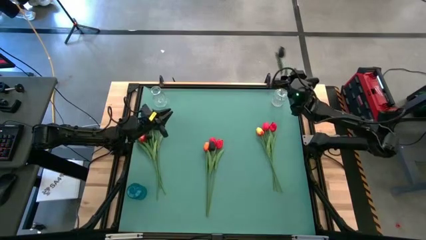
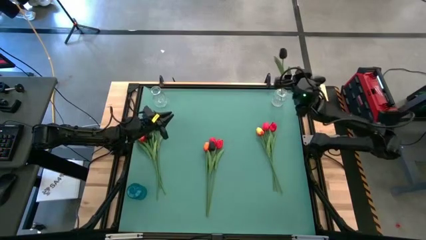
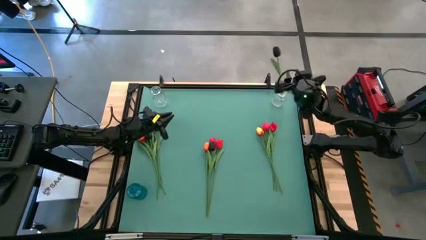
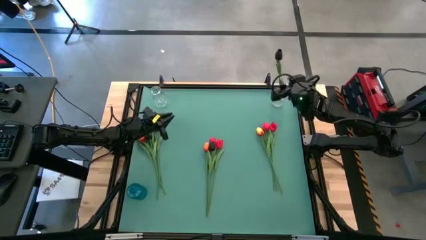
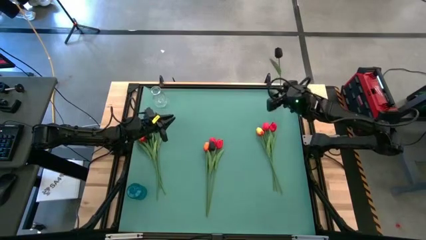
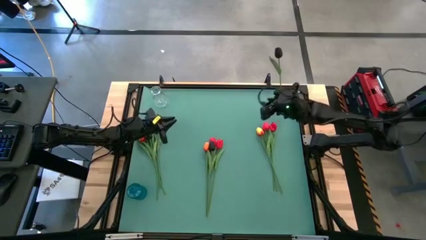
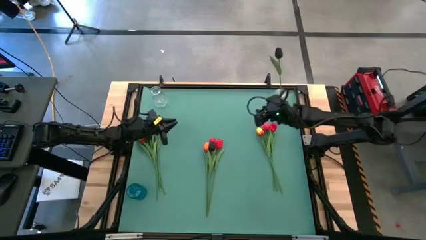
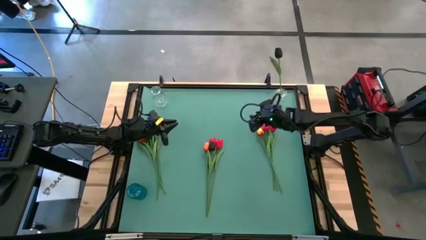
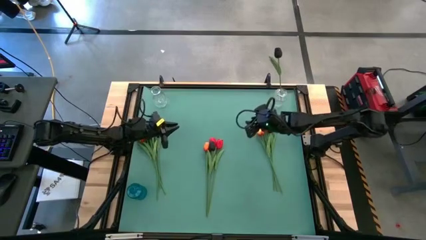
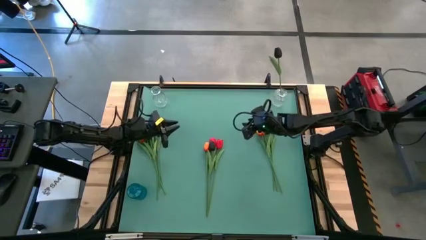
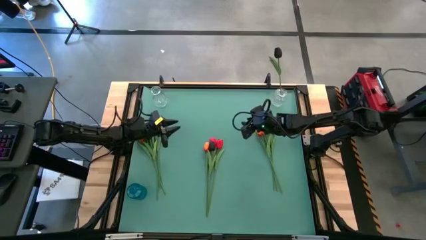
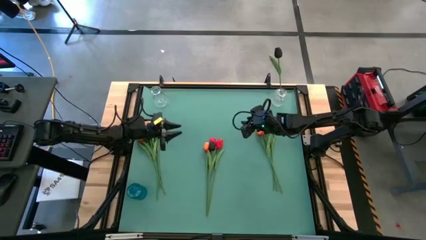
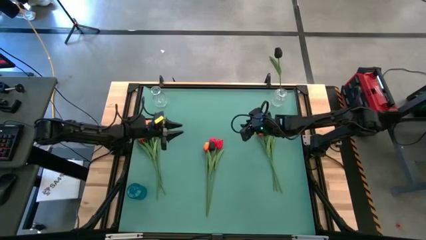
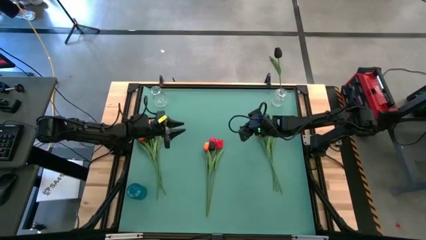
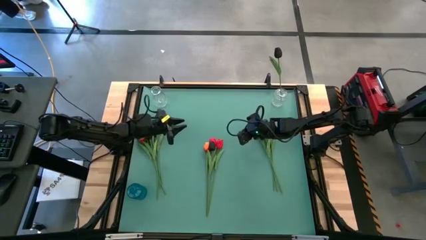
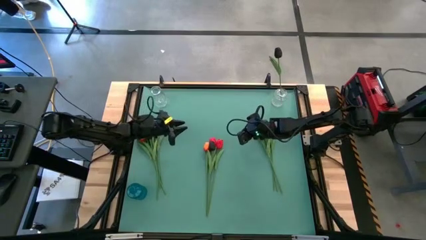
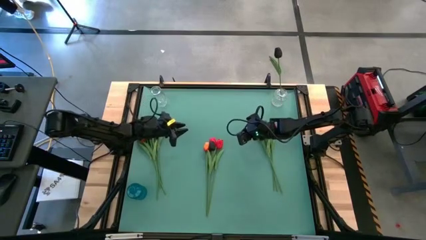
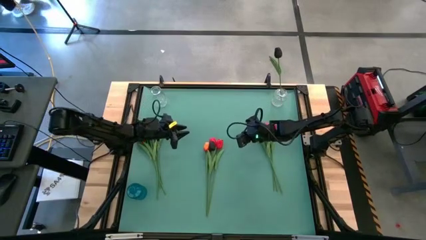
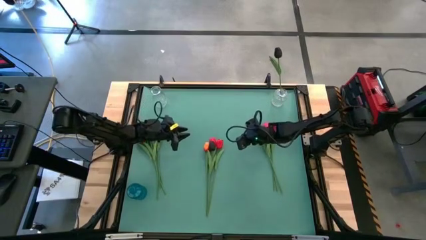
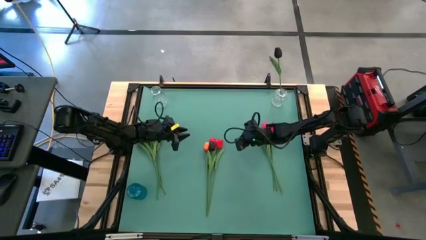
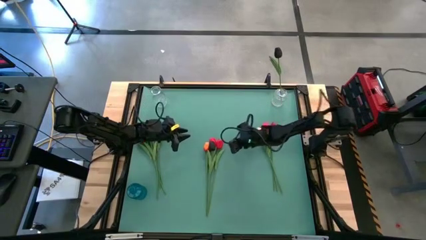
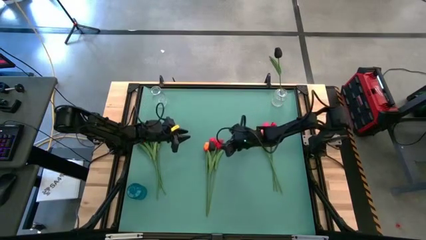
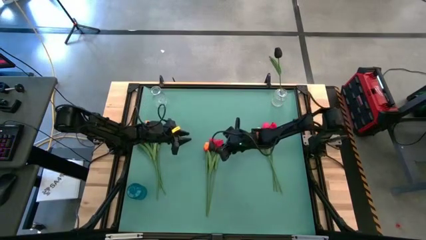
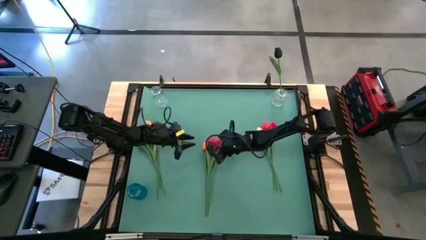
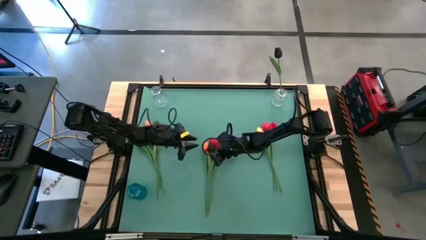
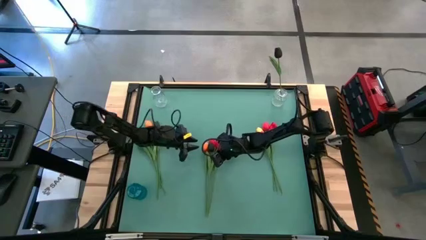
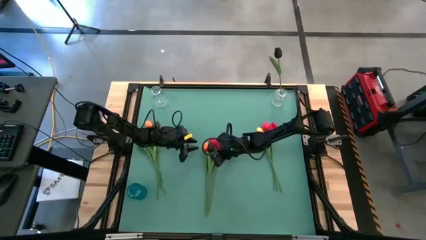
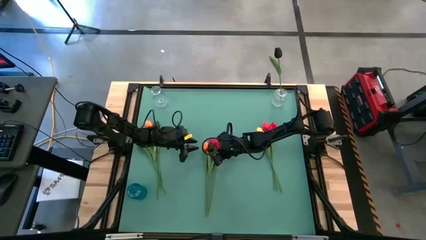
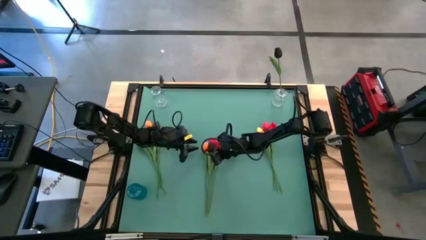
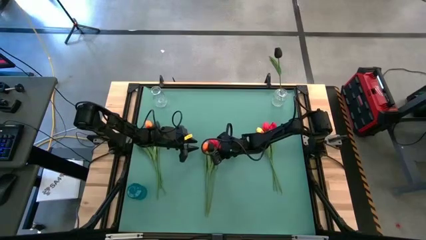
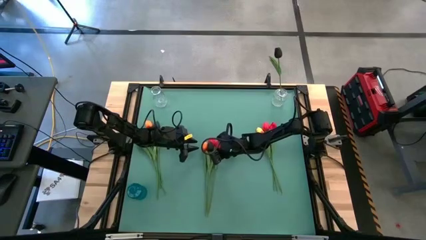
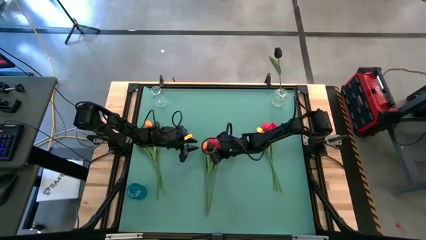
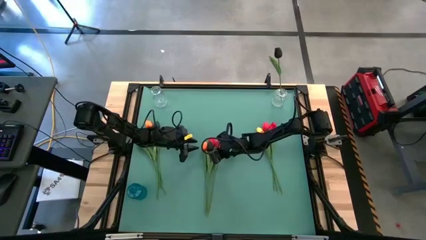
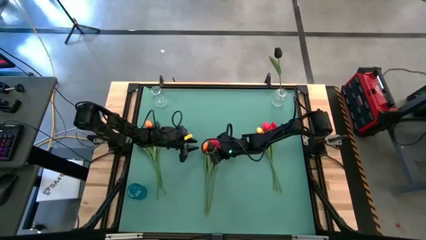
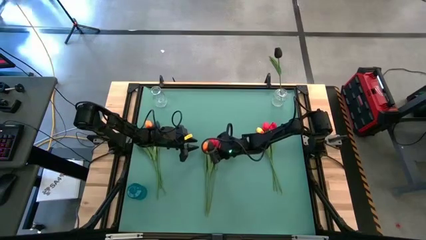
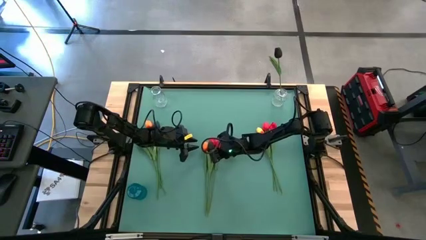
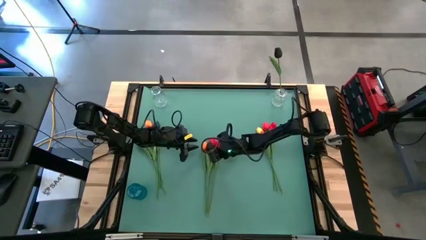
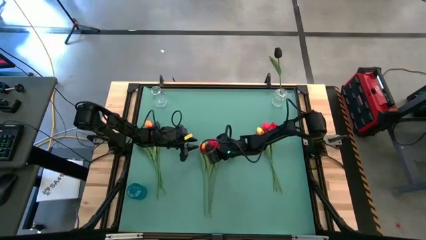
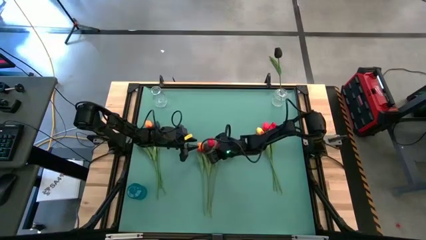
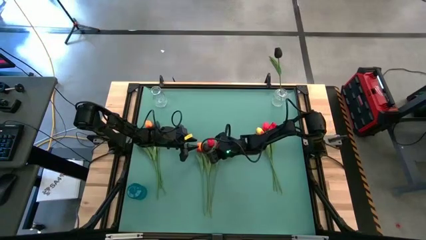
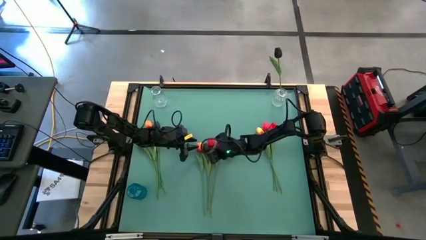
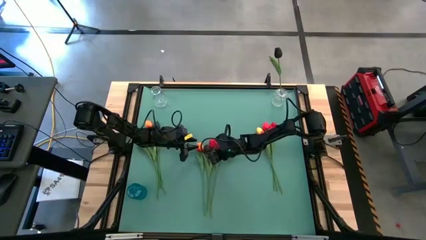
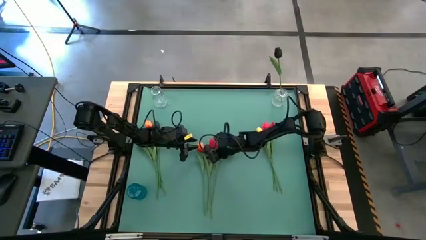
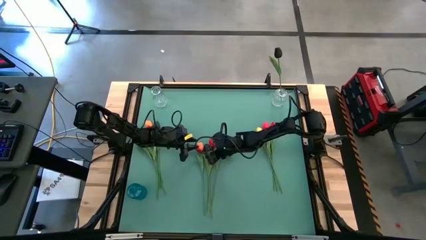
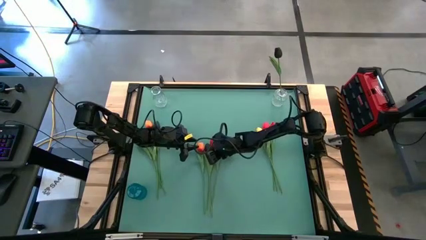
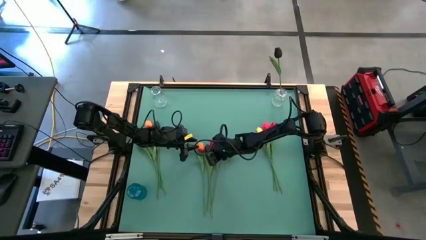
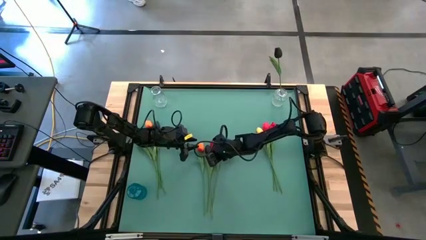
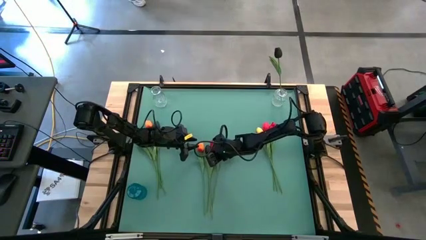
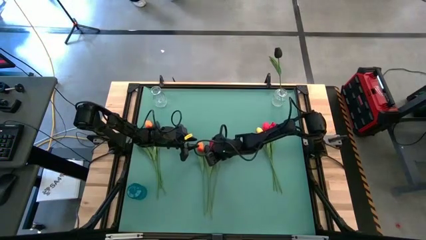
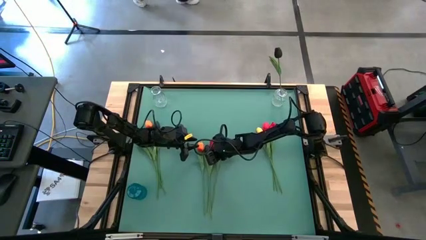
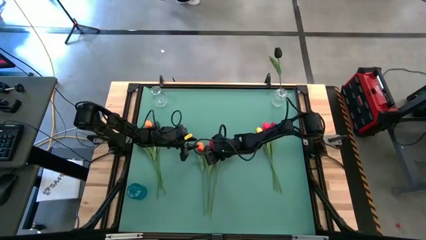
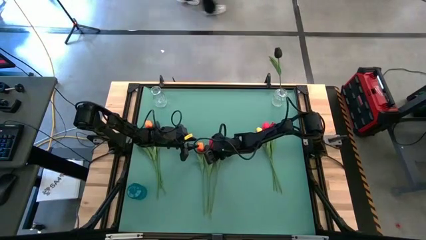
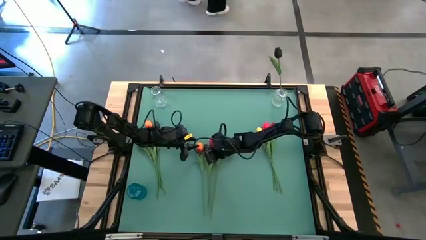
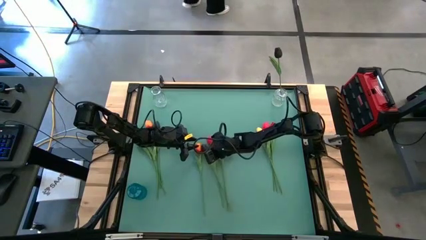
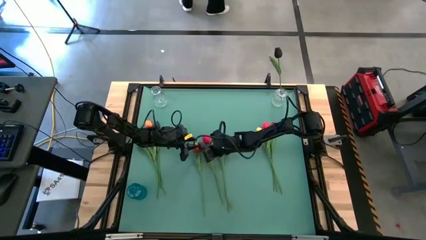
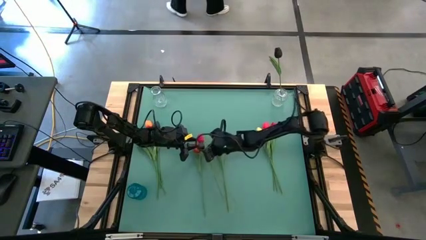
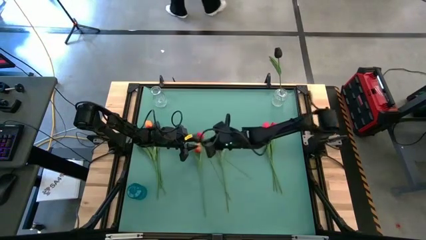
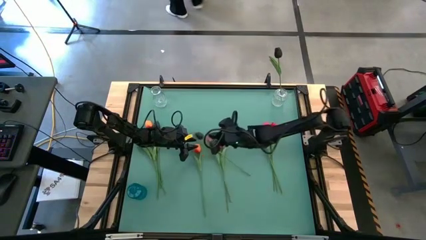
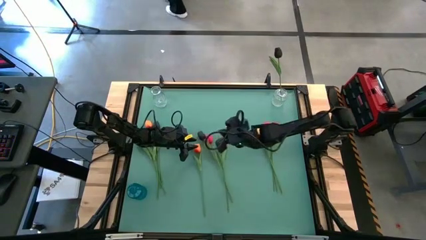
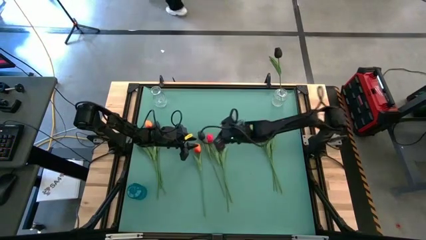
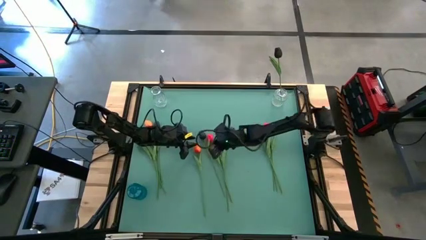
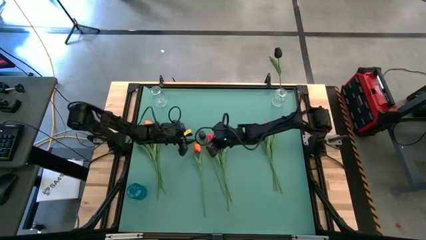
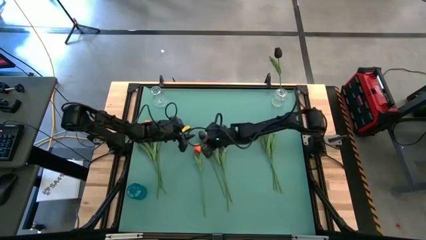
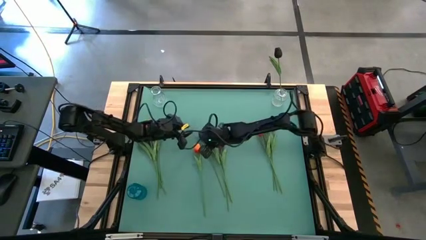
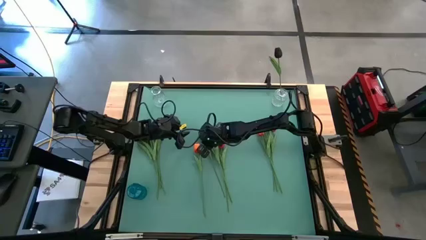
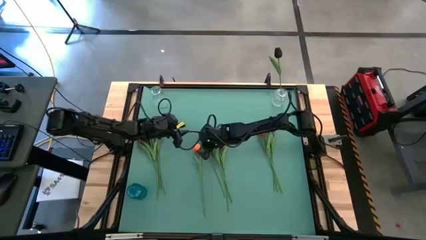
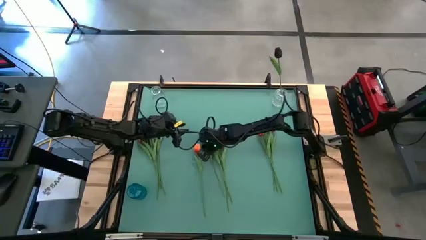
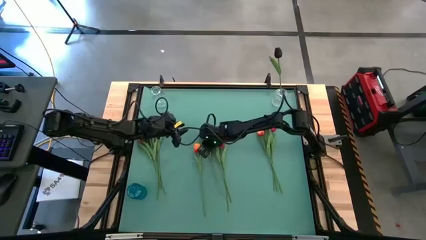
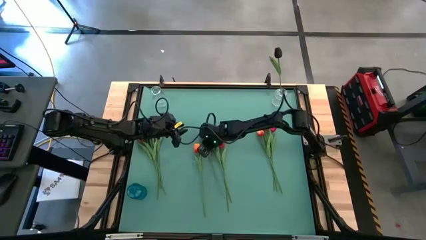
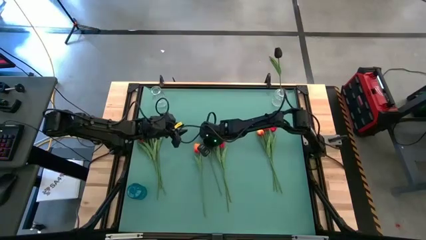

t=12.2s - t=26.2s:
Task: Sort flowers into vase by color
Put the black tulip into the right transparent vase

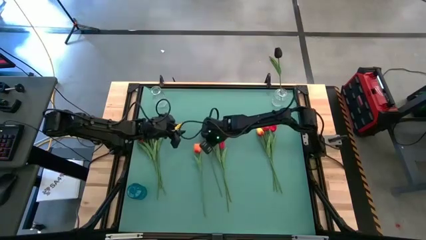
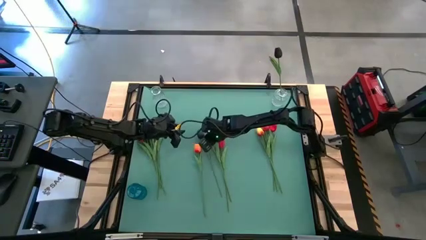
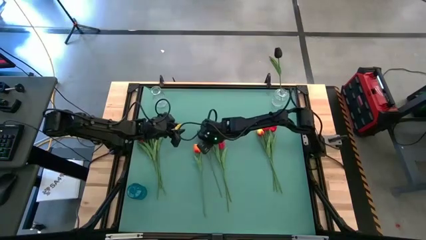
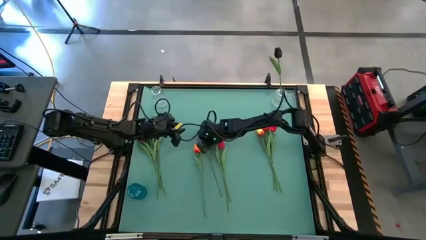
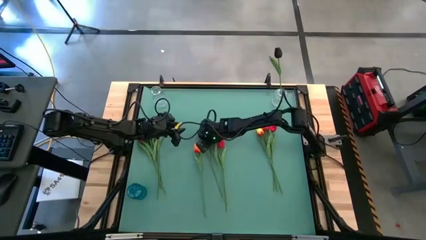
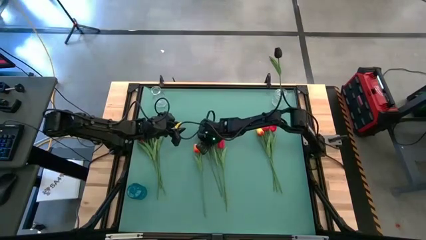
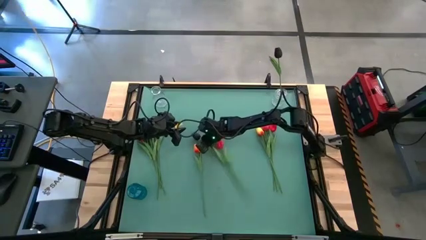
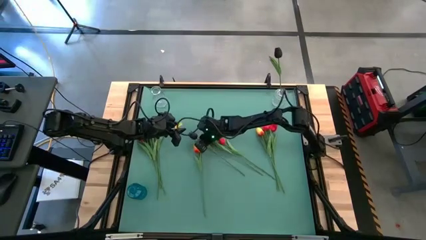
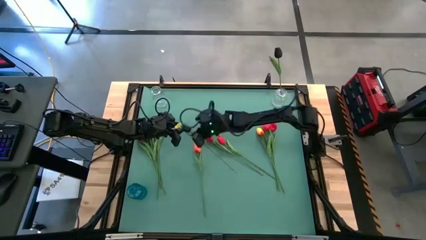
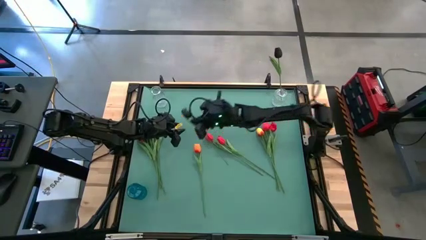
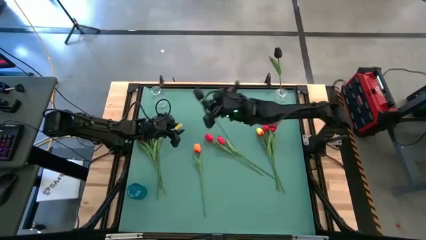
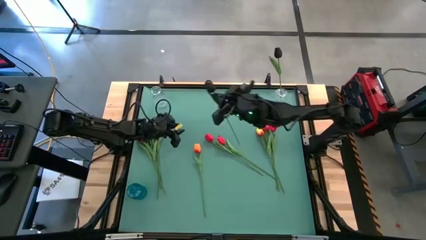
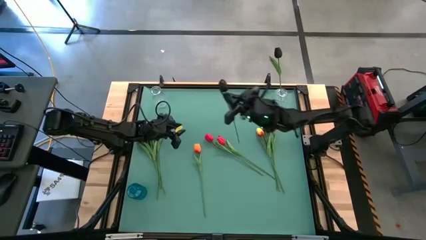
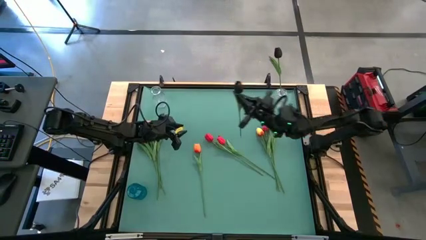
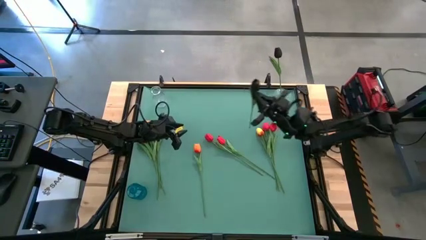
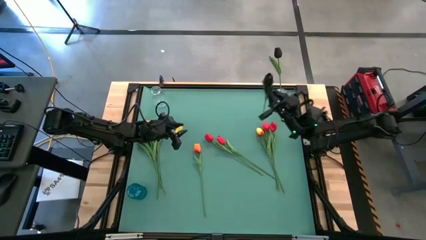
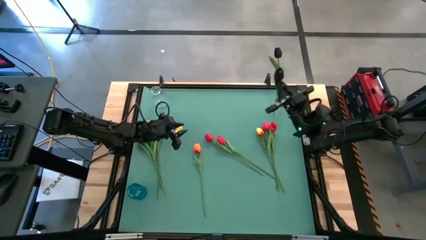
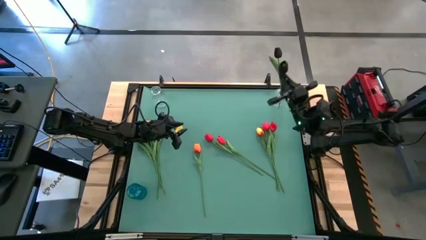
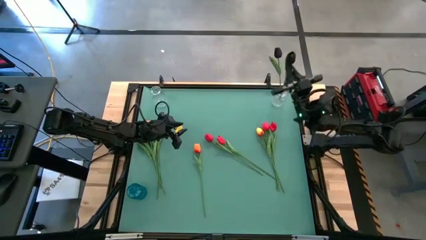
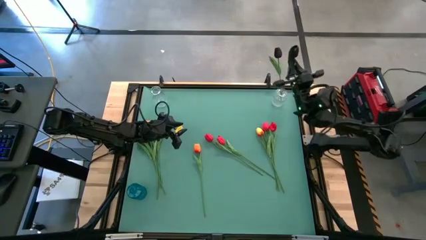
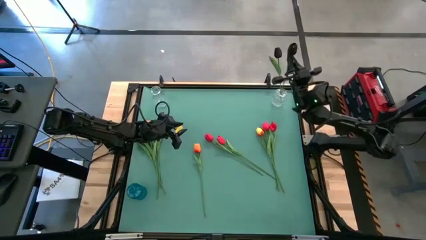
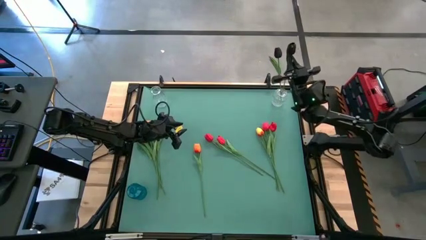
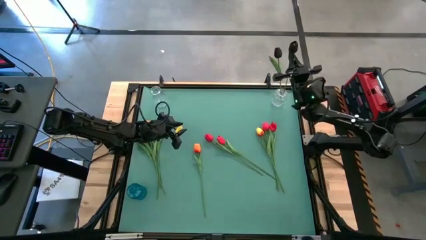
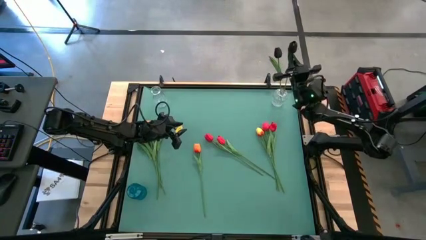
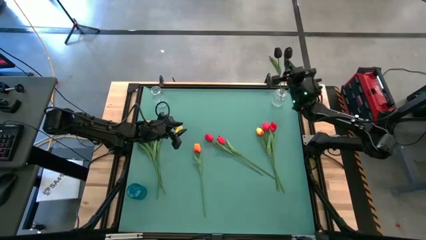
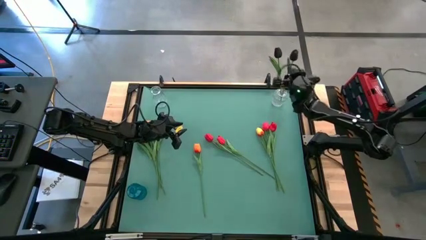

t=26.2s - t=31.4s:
Put the black tulip into the right transparent vase
